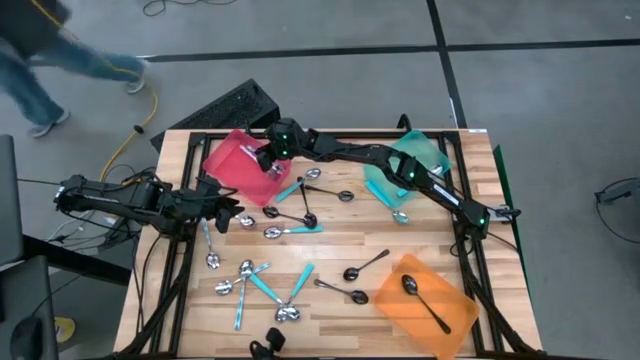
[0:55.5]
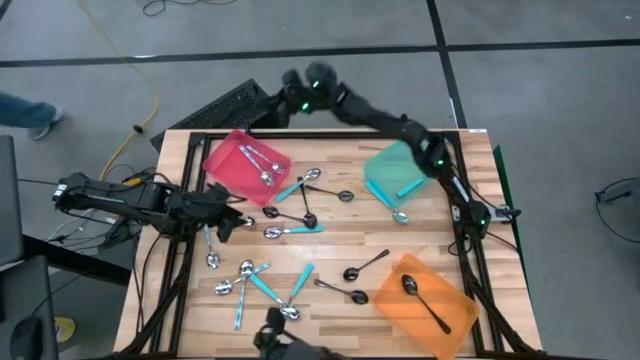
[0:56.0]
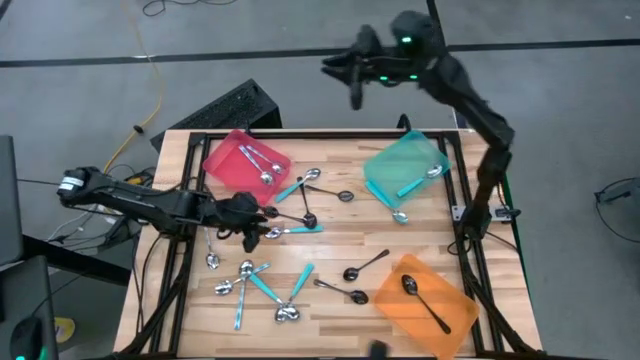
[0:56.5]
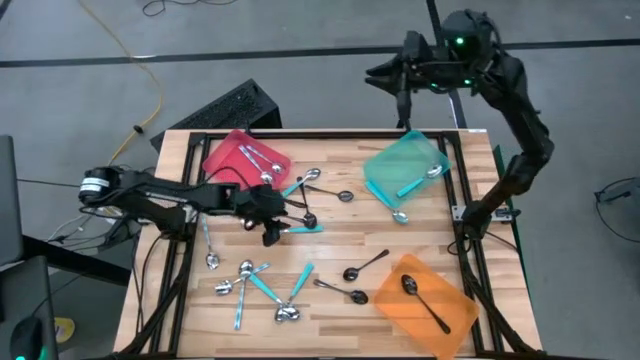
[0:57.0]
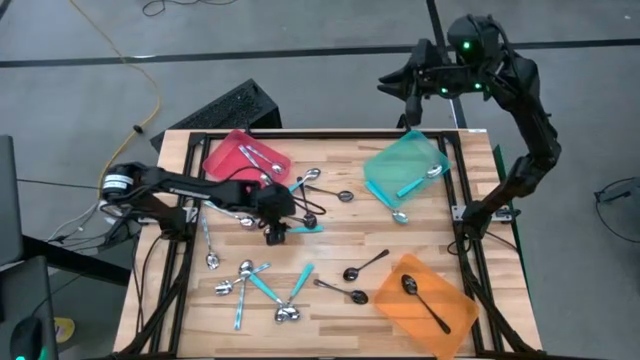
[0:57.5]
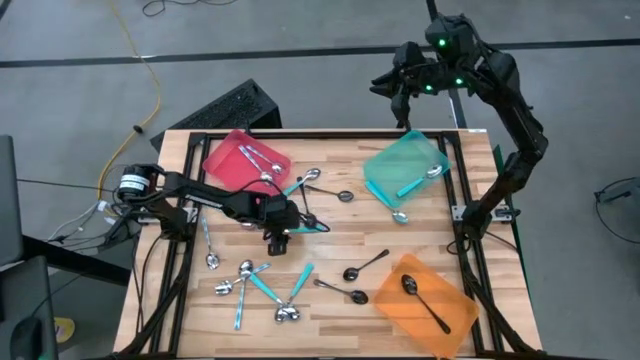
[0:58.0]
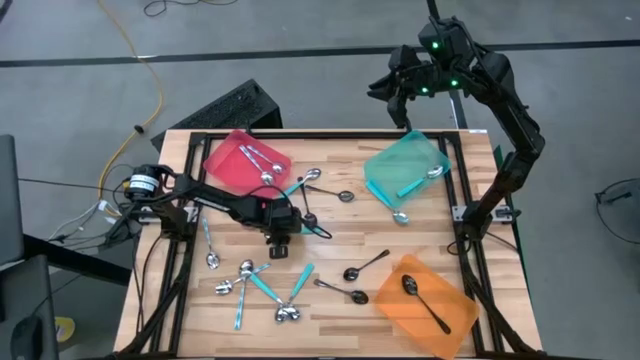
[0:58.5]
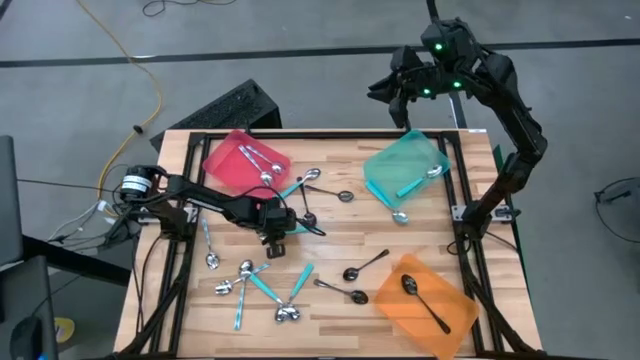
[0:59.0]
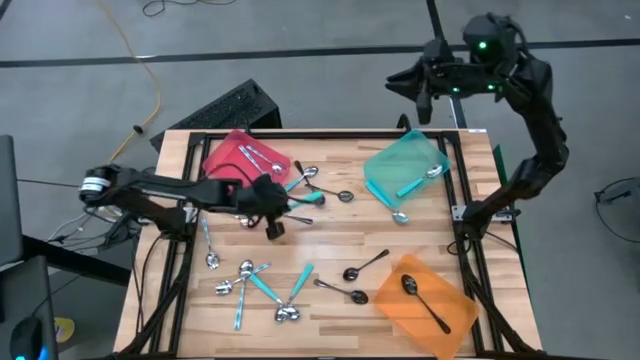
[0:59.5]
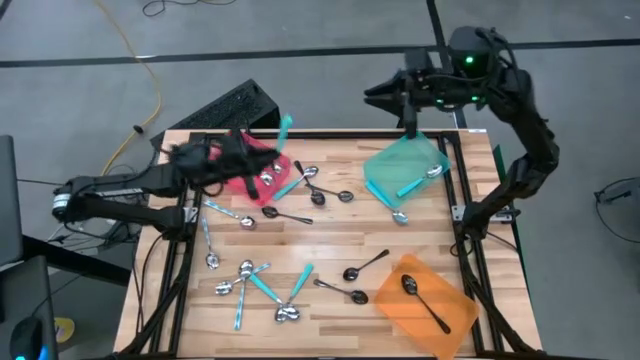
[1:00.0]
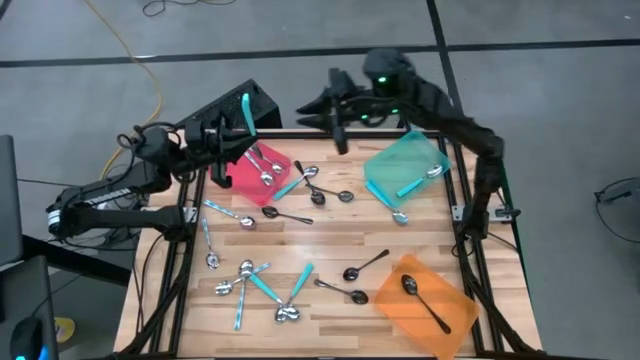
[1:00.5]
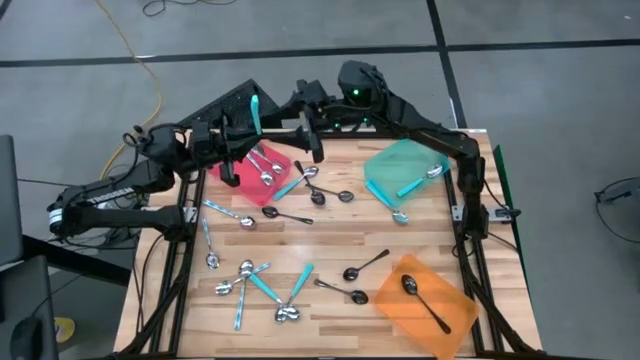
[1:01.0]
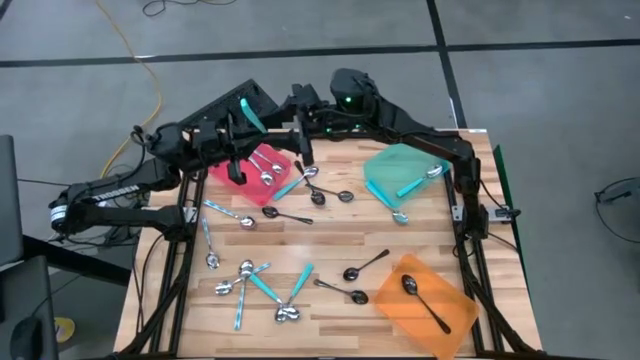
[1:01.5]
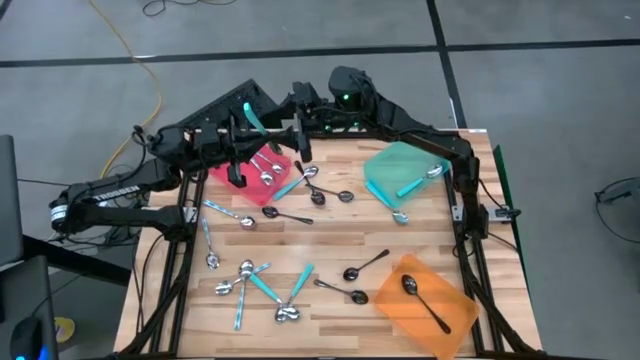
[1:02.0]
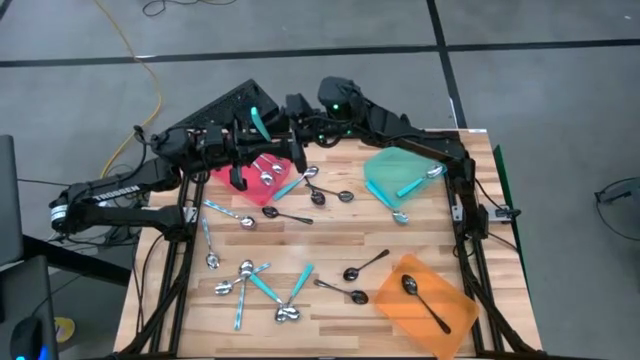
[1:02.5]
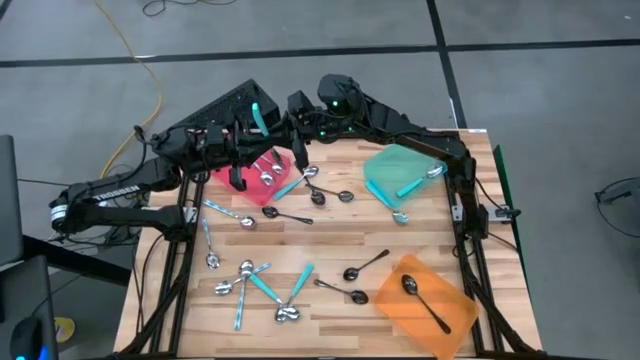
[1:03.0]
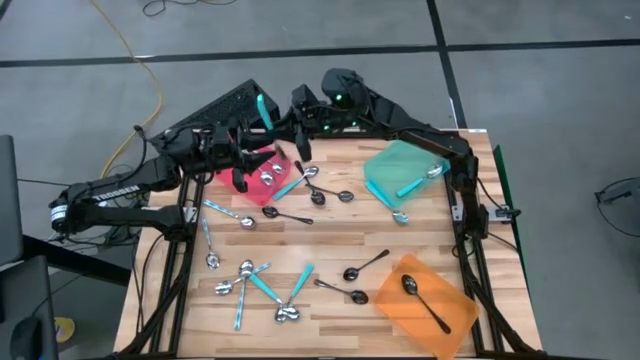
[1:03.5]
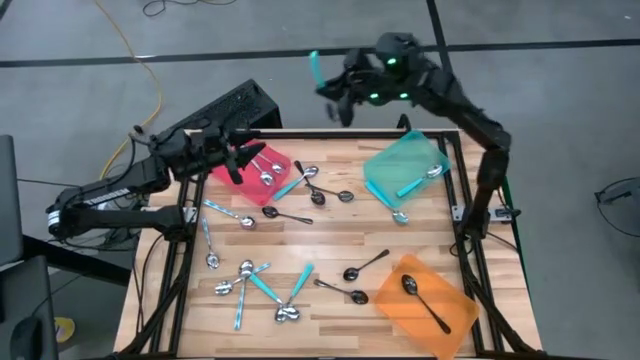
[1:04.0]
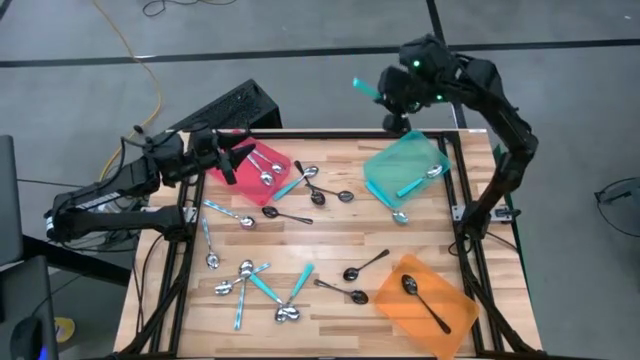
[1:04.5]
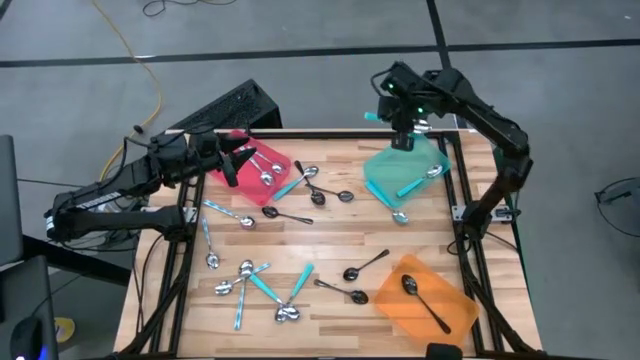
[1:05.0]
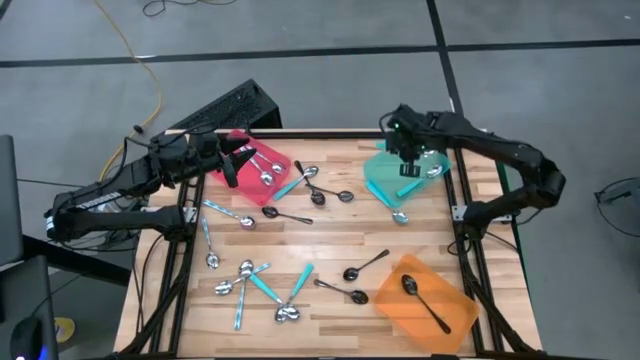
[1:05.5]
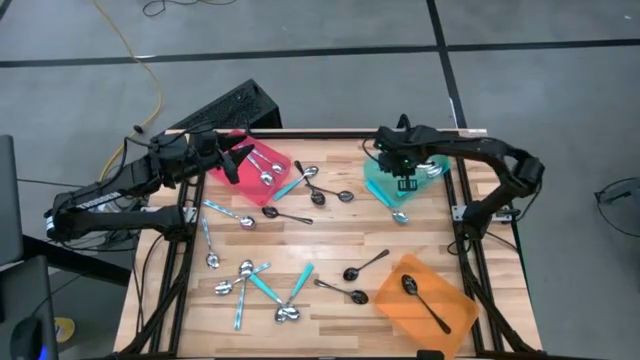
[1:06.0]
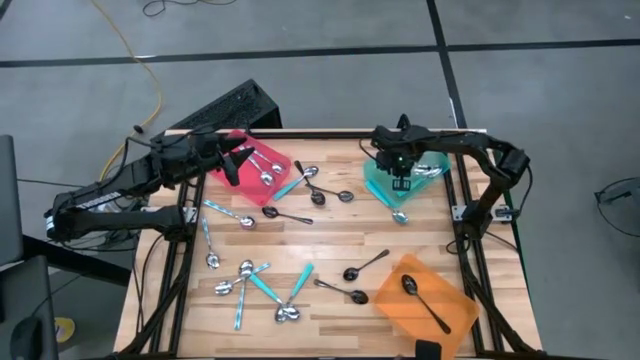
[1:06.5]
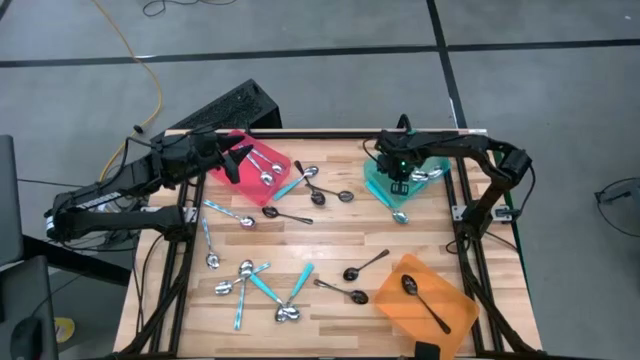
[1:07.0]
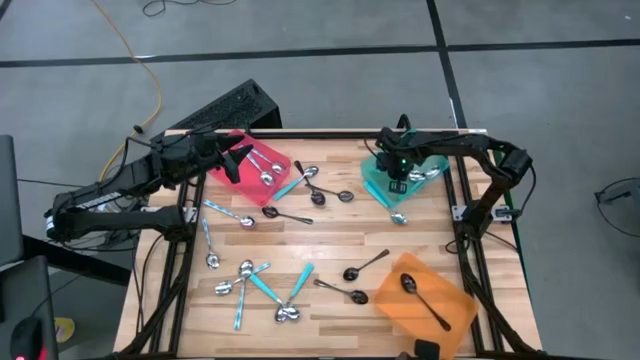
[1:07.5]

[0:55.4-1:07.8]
Task: Sort silverware by color (type)
Put the blue spoon into the blue bin

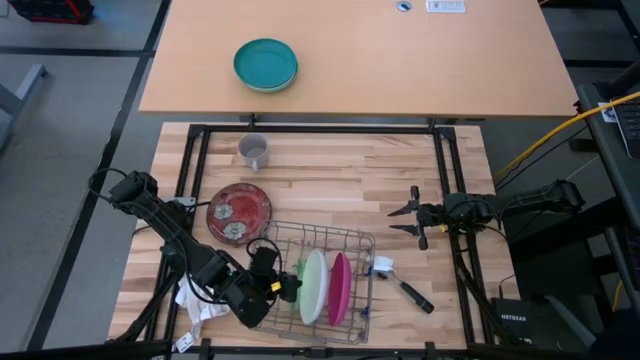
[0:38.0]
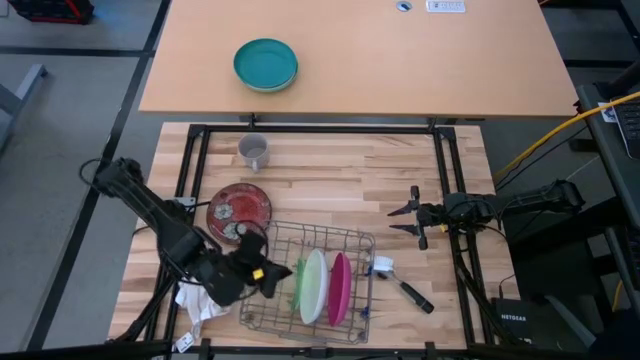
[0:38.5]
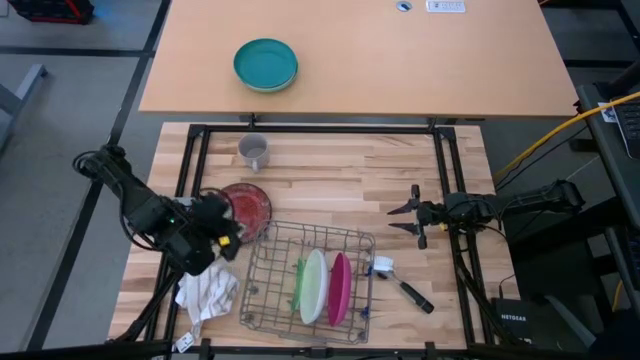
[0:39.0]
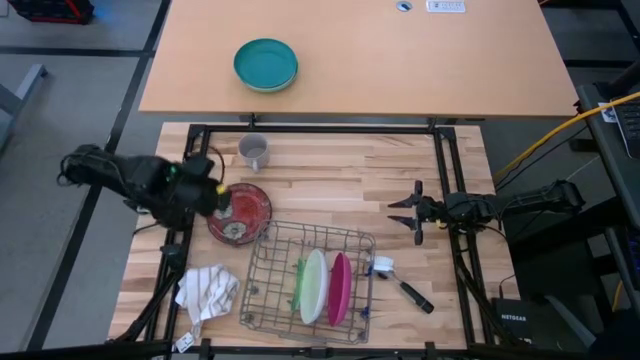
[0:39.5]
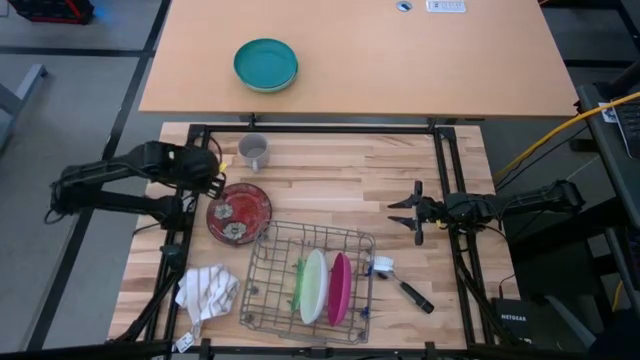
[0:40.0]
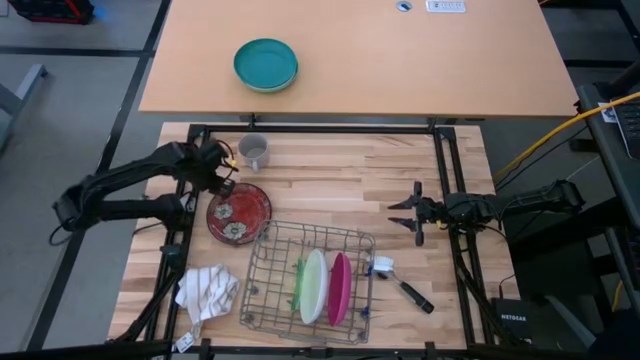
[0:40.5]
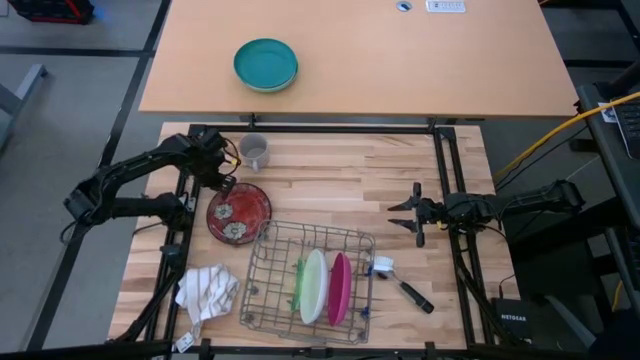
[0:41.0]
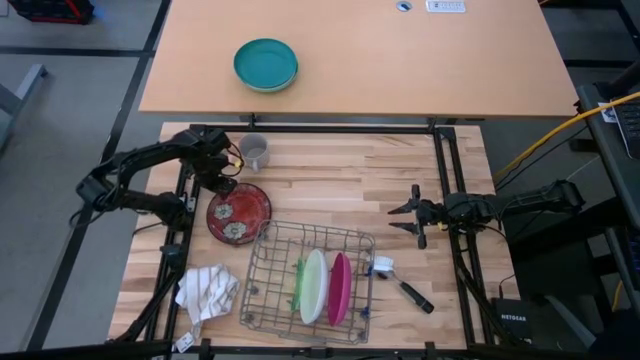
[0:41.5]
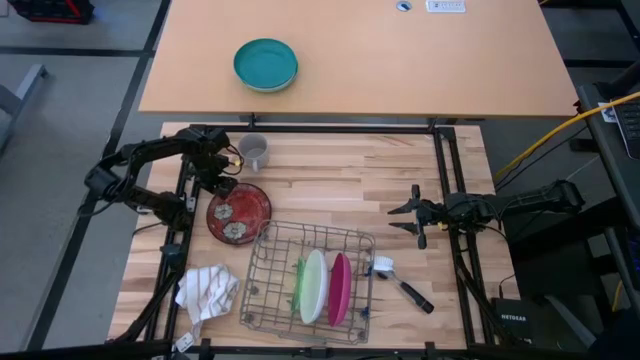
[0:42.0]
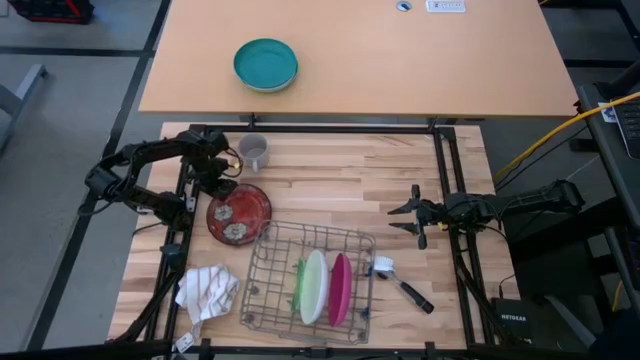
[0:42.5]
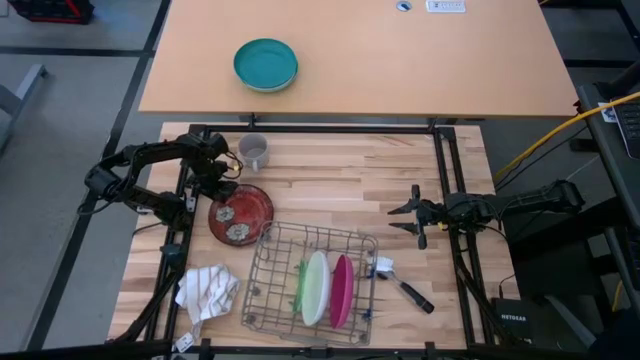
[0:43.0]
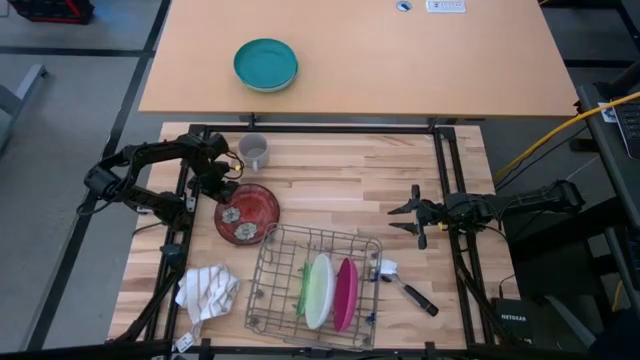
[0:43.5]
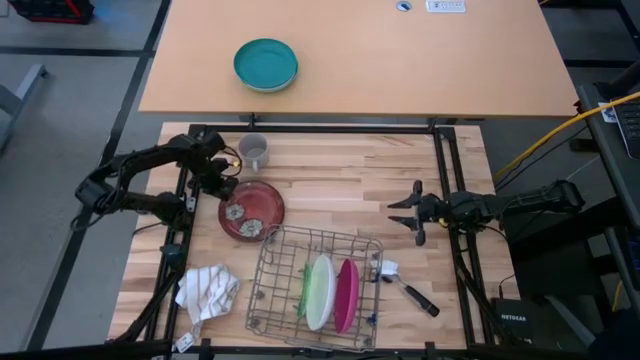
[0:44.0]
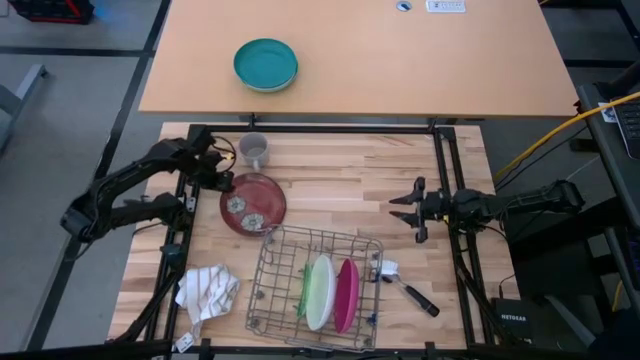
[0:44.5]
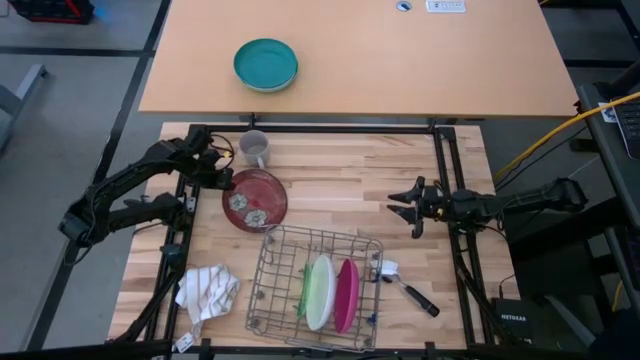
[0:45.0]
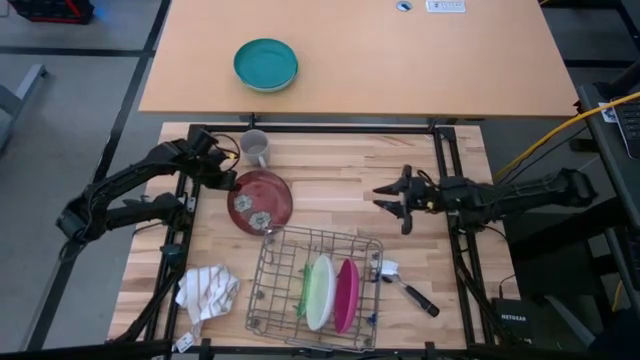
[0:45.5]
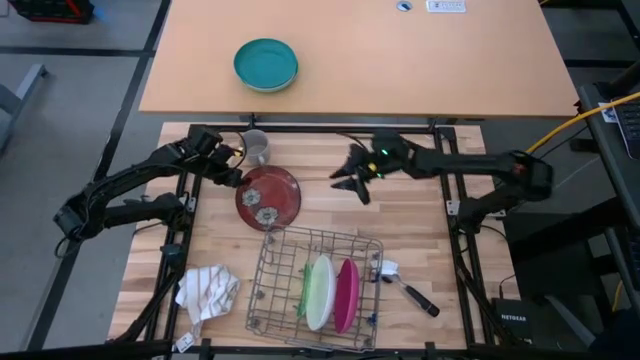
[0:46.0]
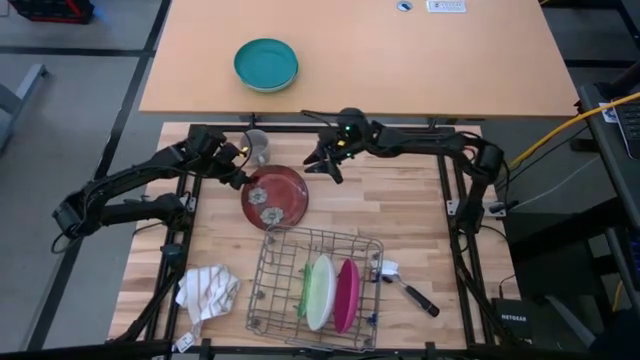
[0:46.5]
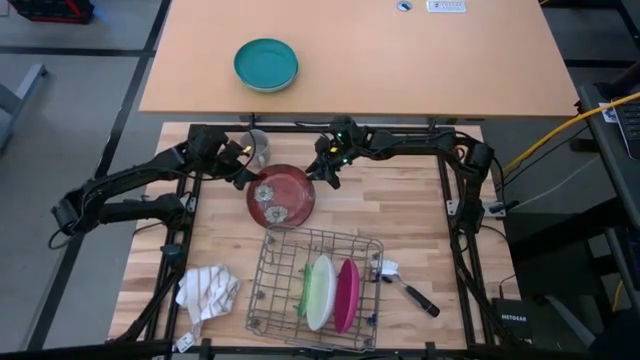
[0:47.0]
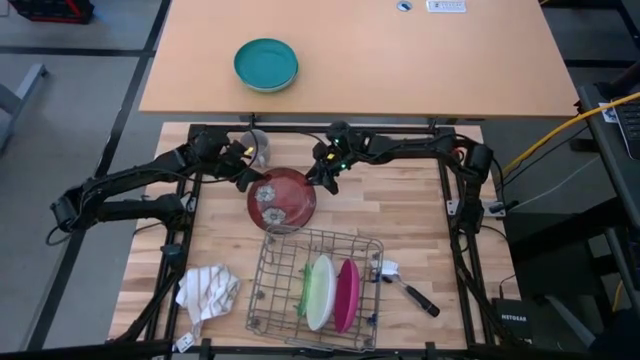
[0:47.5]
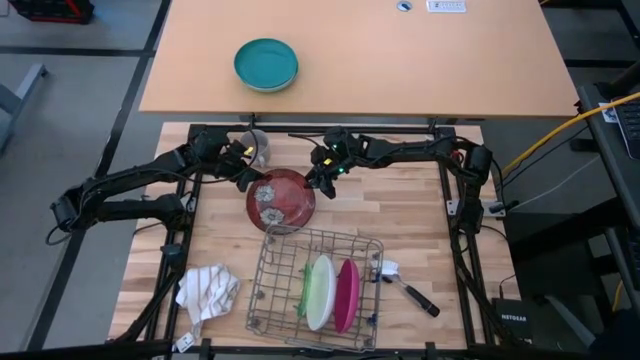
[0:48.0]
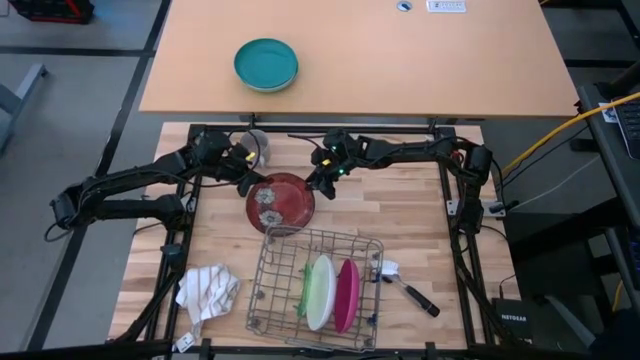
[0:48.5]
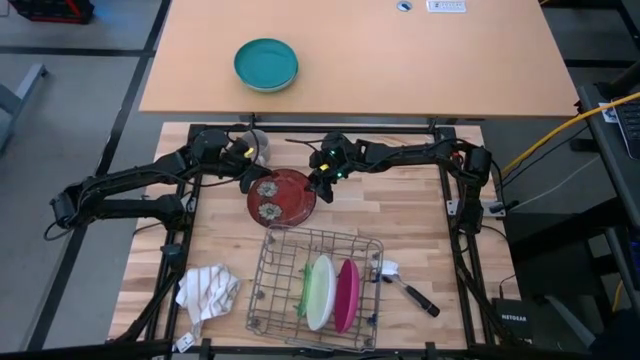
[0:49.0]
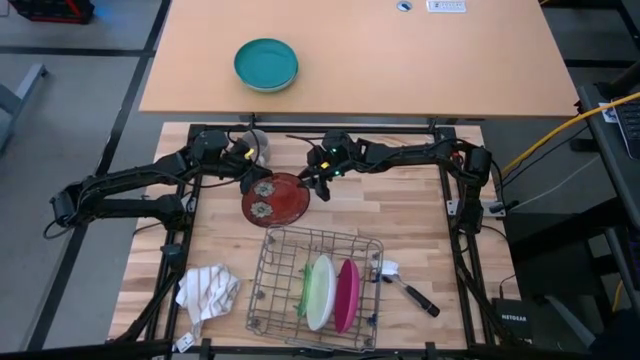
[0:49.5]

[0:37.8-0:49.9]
Task: Sort dishes
Put the red plate into the dish rack
